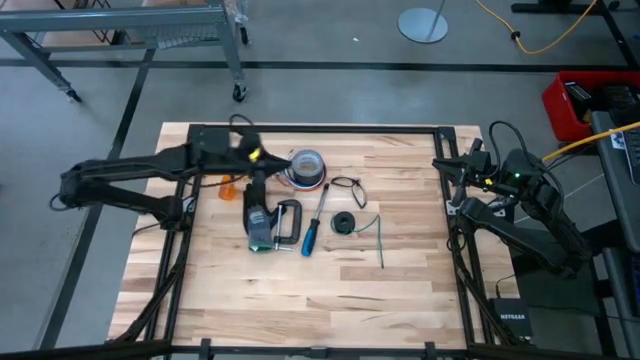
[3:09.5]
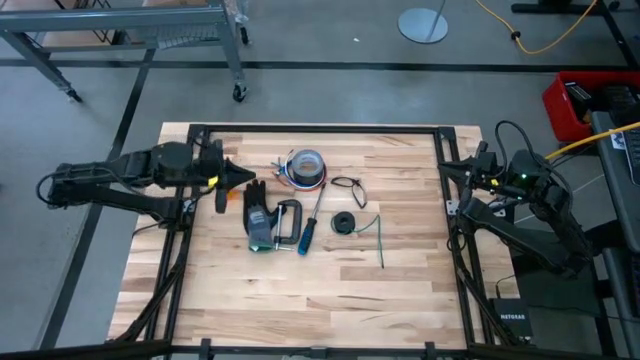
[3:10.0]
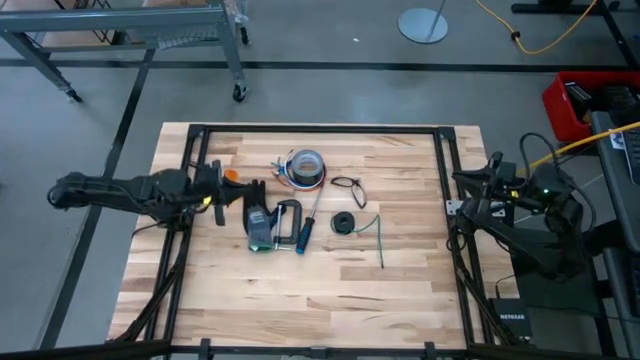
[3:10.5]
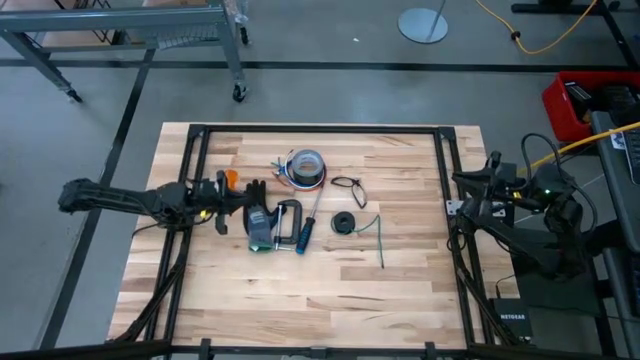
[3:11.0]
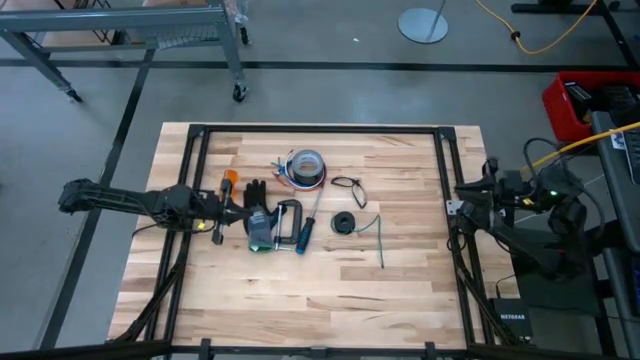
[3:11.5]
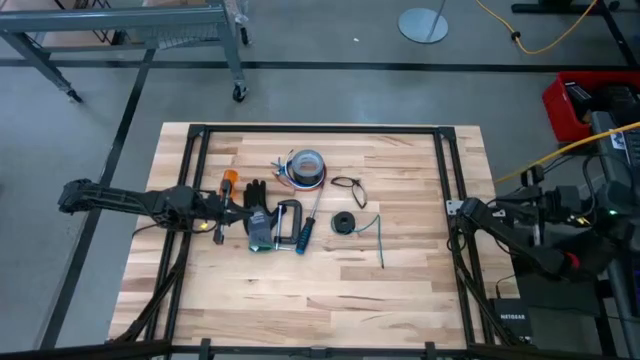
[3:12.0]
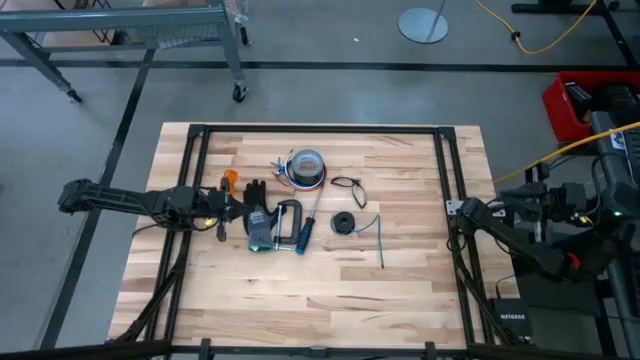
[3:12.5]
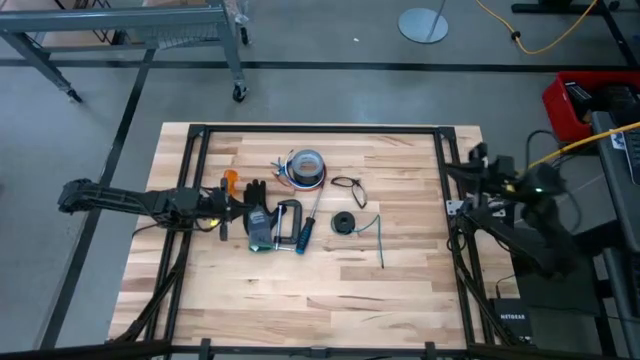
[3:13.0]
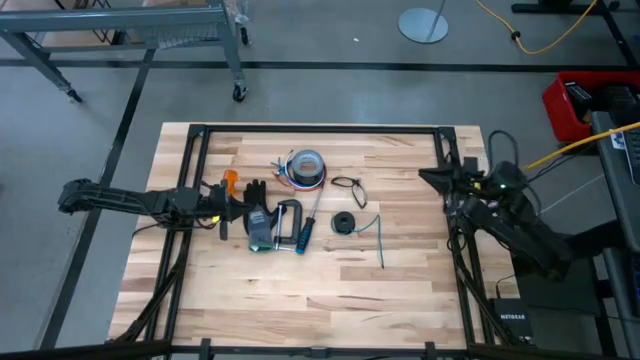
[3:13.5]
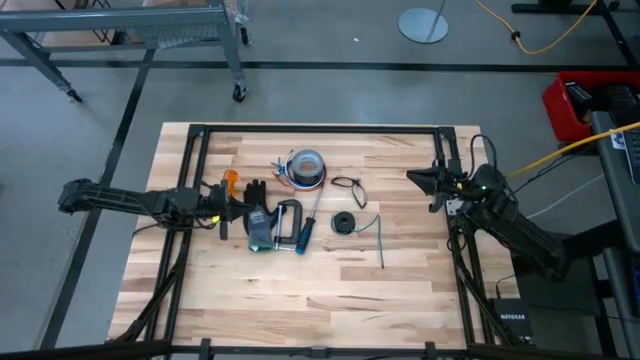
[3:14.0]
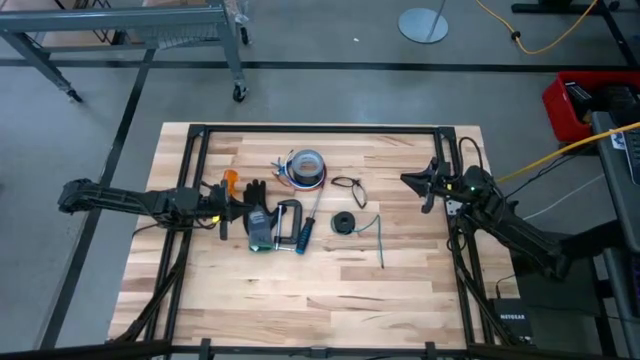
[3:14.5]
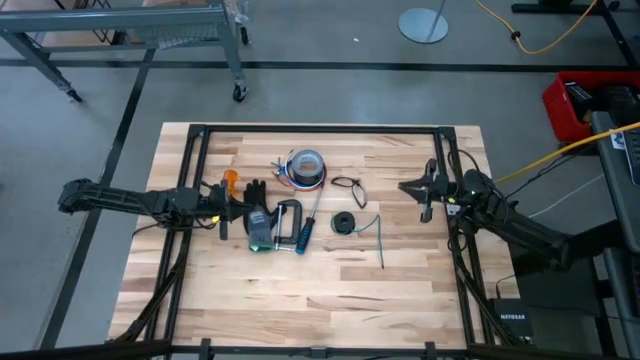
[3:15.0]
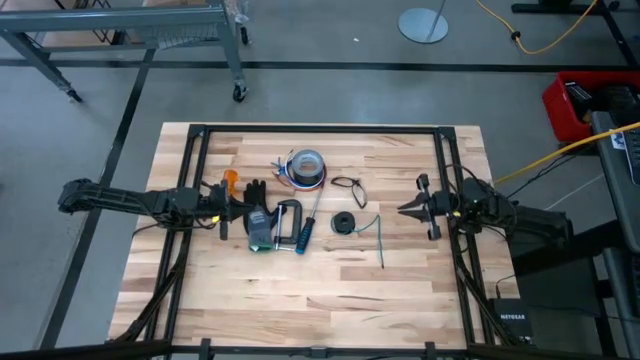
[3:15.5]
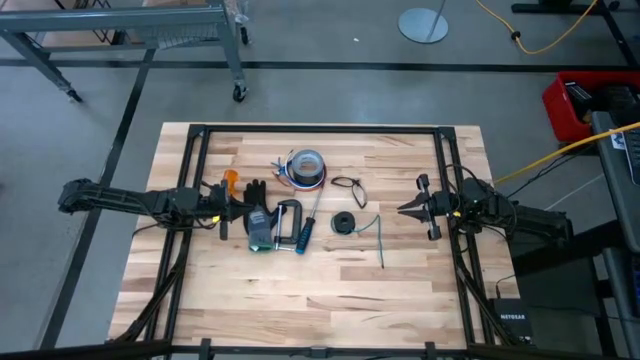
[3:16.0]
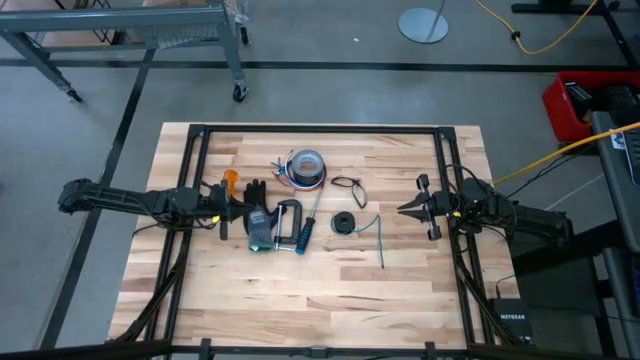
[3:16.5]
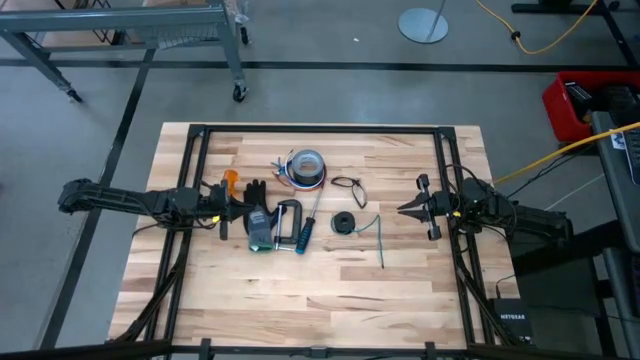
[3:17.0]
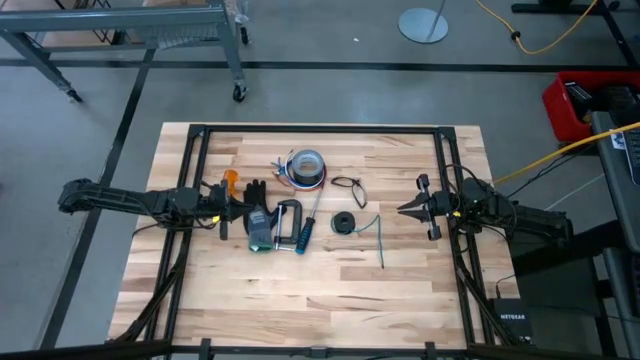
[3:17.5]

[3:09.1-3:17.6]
Task: Coil cords
Return to home position

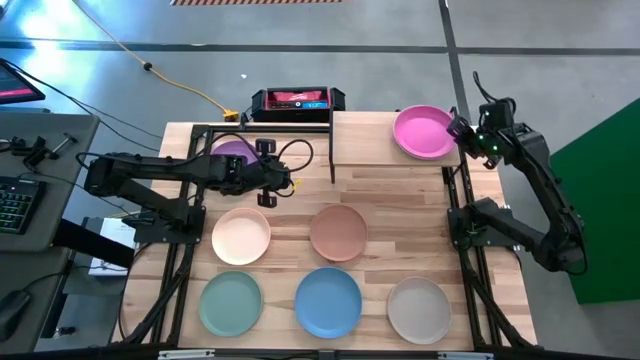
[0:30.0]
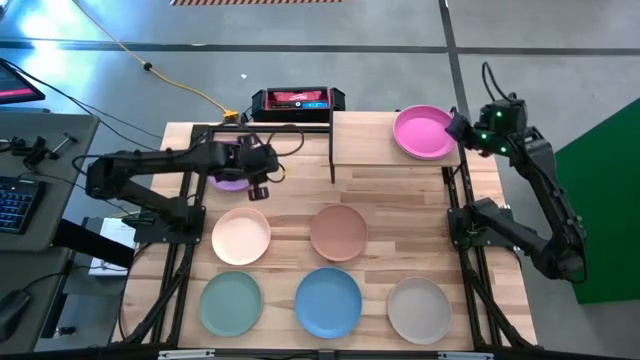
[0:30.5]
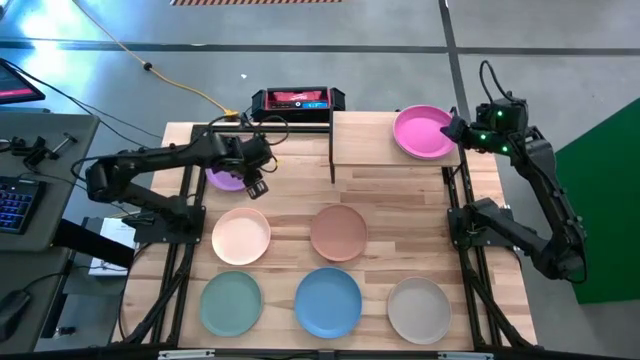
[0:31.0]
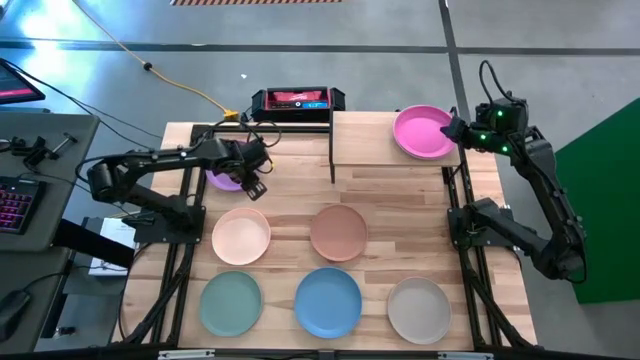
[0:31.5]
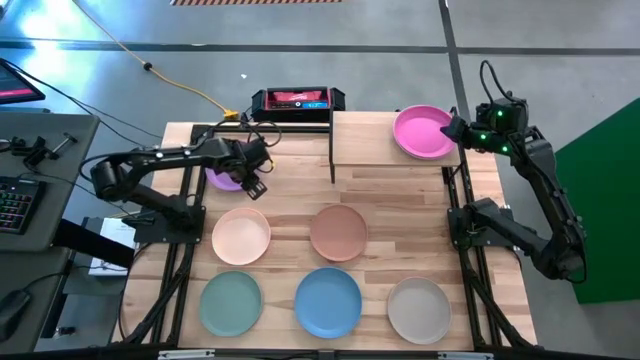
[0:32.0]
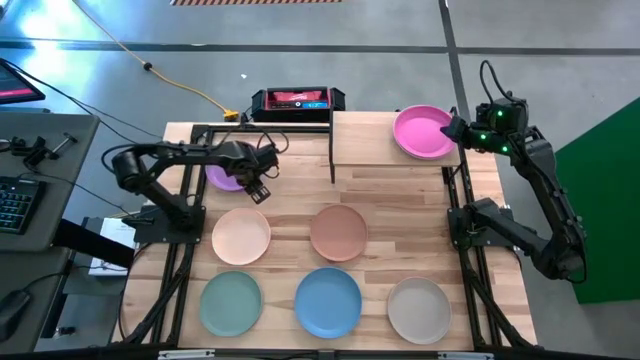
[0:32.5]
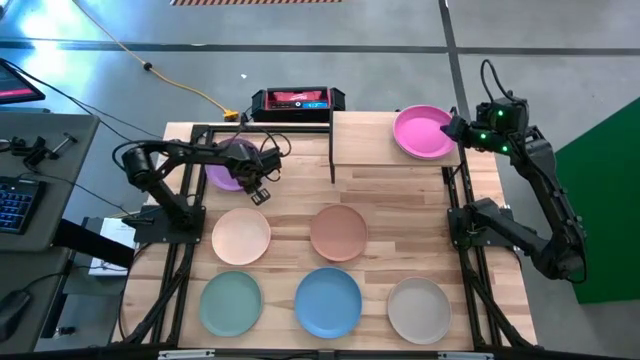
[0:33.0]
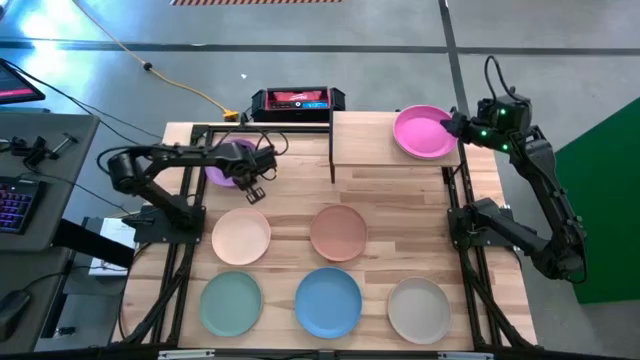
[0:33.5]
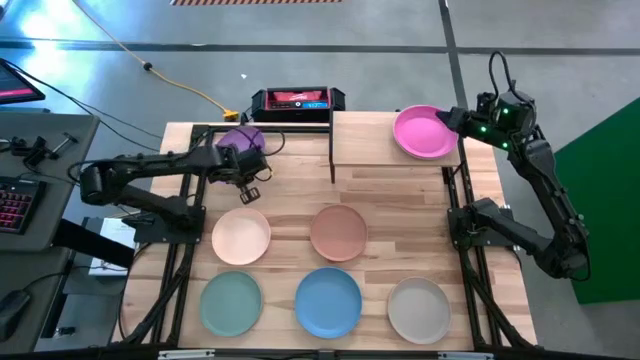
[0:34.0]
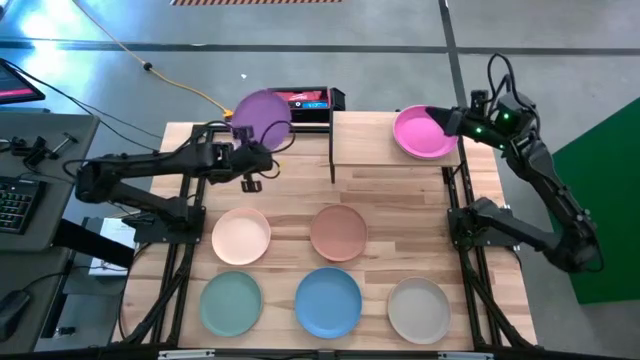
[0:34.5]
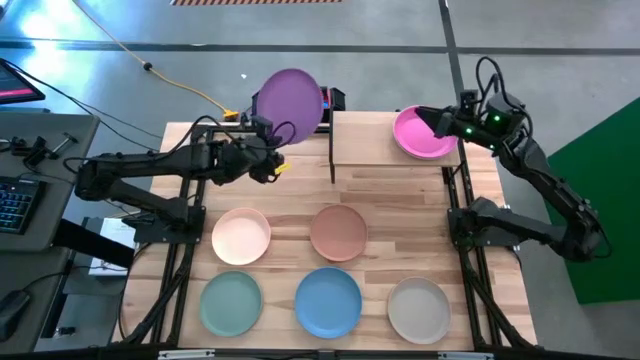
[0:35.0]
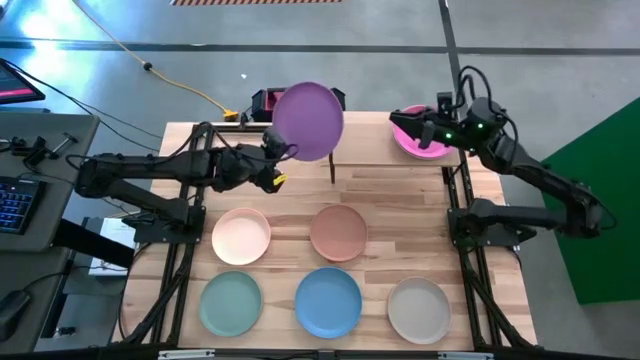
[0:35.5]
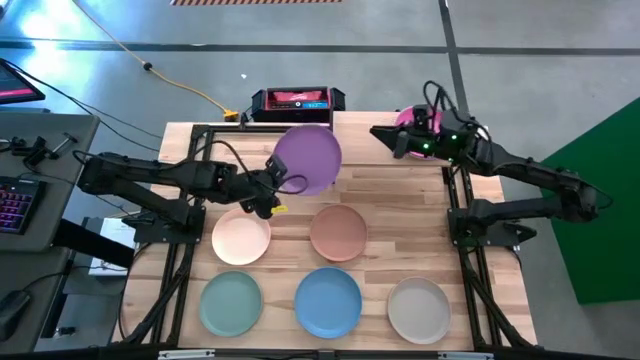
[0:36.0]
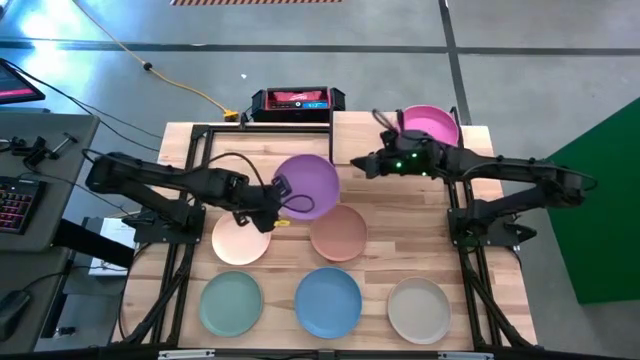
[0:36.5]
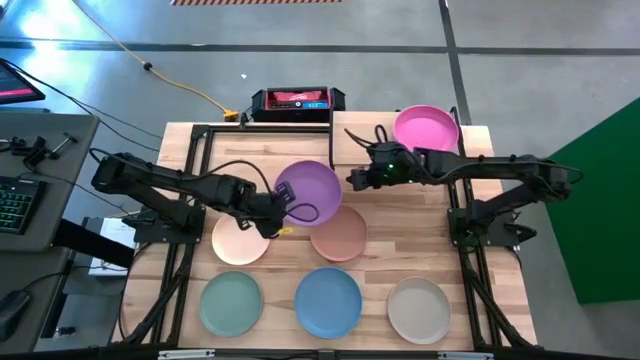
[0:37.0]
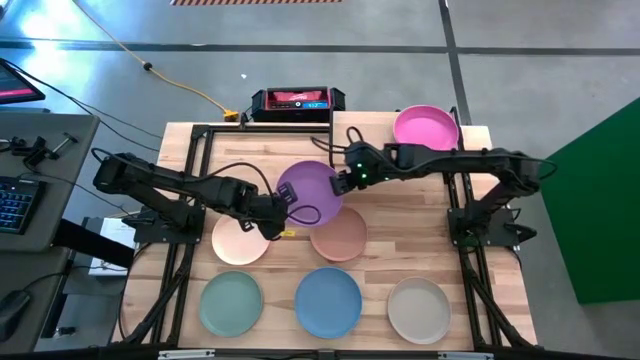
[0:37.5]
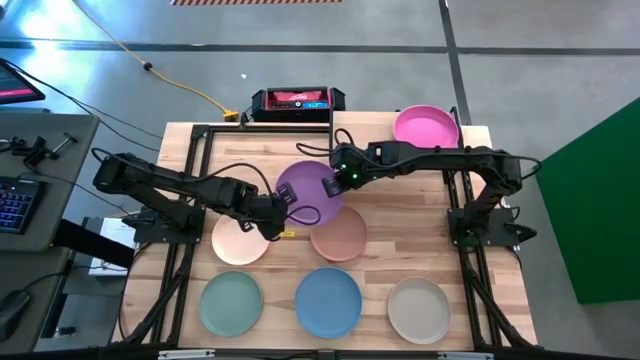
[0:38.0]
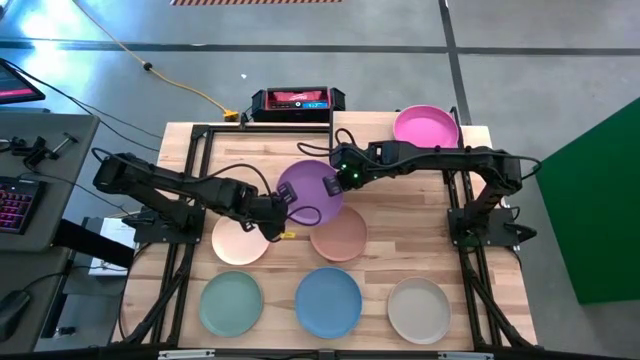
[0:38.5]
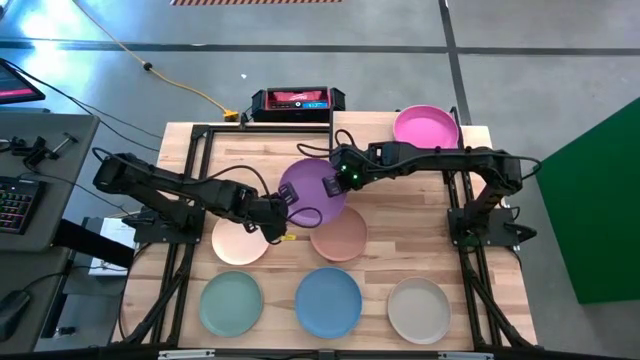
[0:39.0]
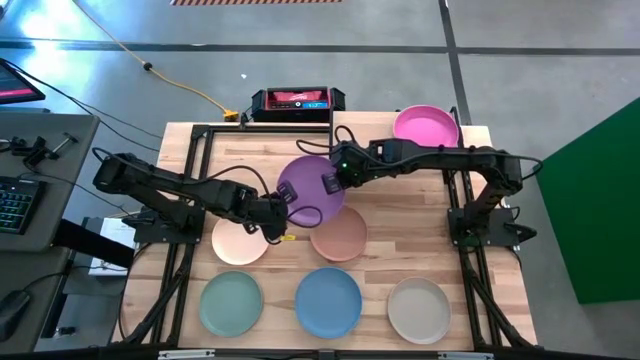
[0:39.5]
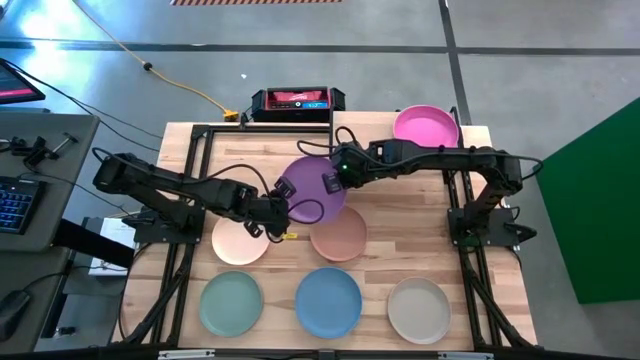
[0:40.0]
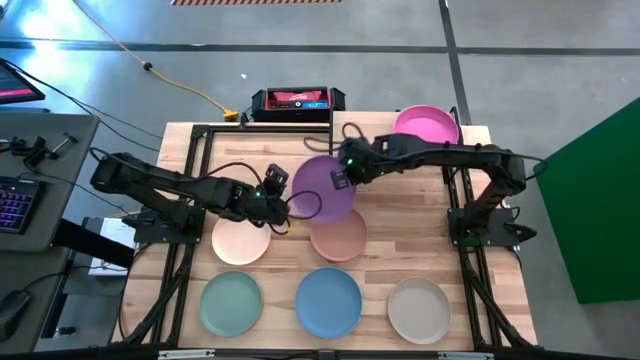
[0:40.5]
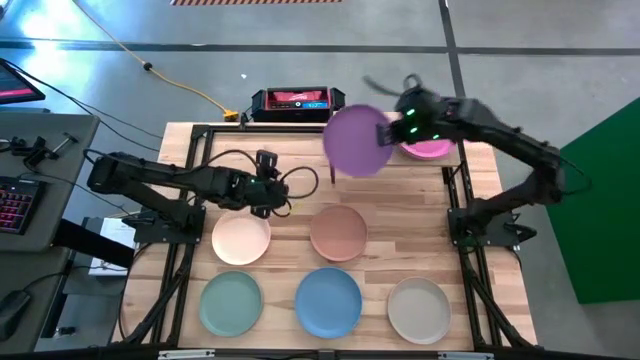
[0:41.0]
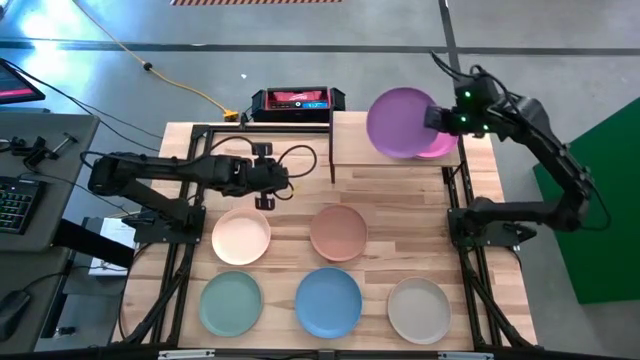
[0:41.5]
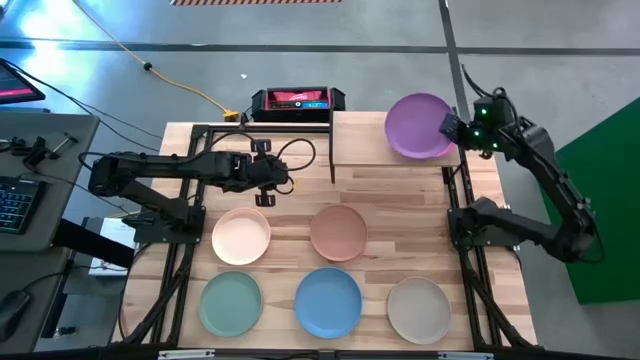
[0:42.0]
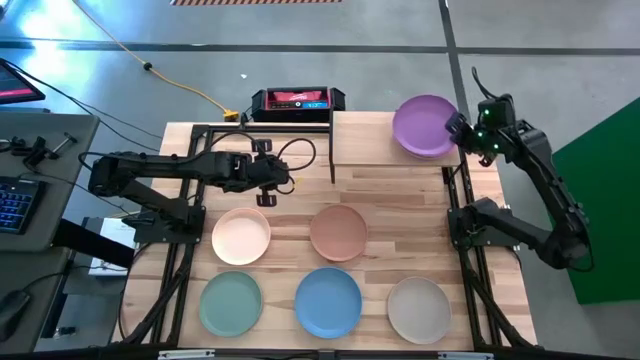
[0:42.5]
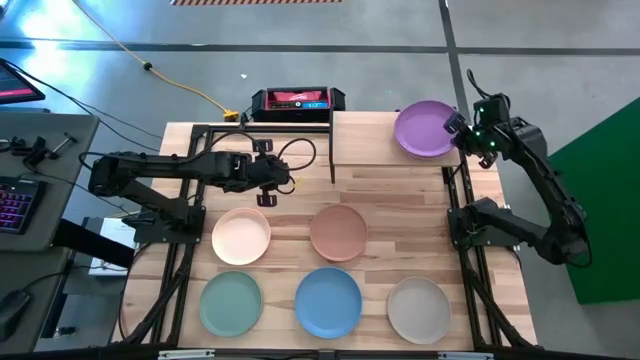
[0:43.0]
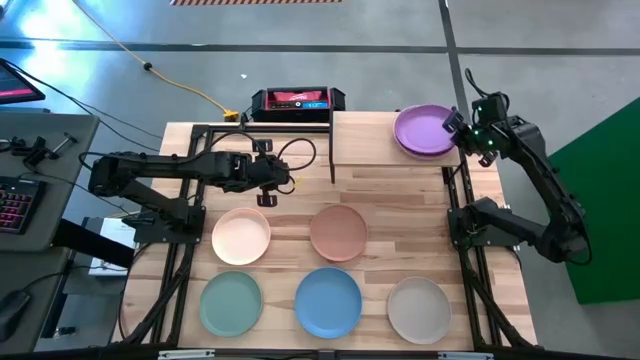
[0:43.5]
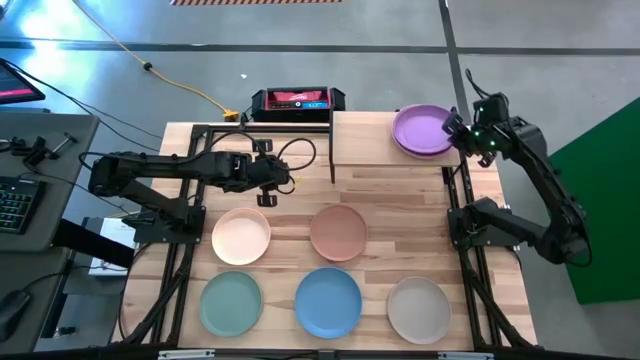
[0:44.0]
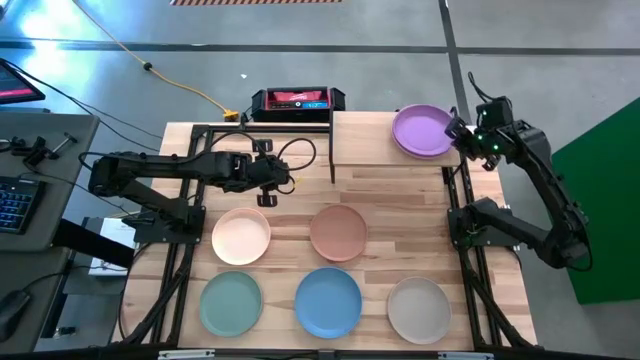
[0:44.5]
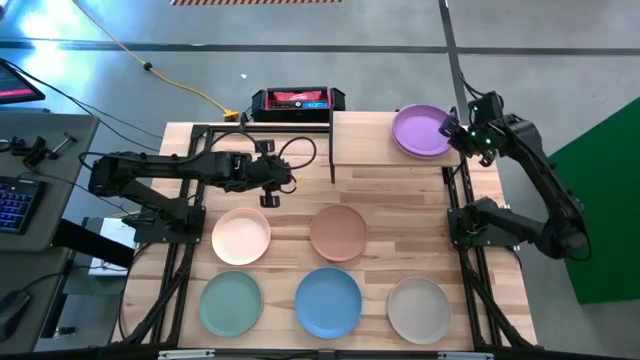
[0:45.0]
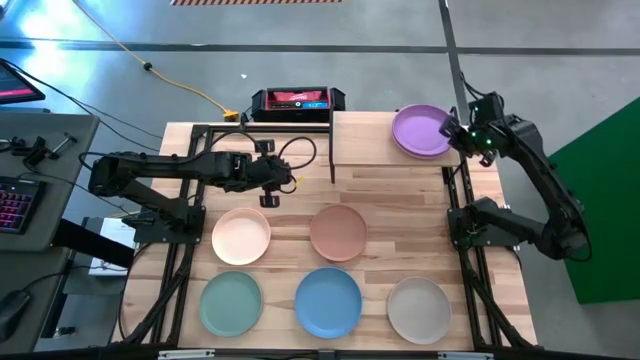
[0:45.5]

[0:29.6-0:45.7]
Task: Place and stack plates onto a shelf
Stack the violet plate on top of the pink plate on the shelf
